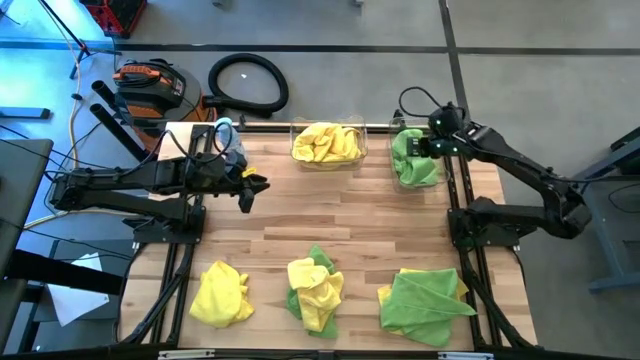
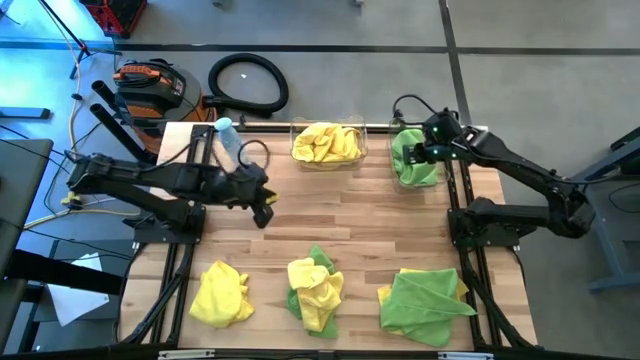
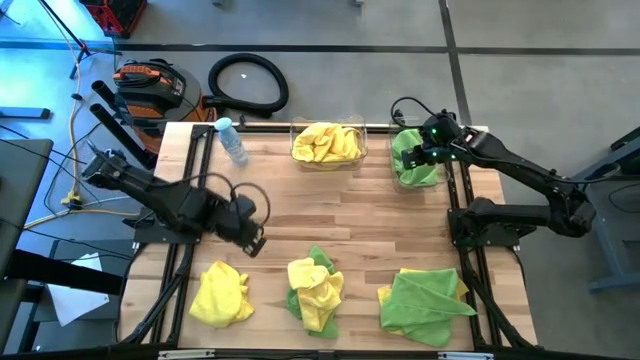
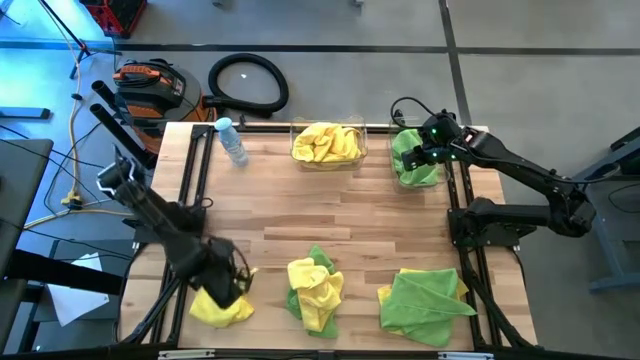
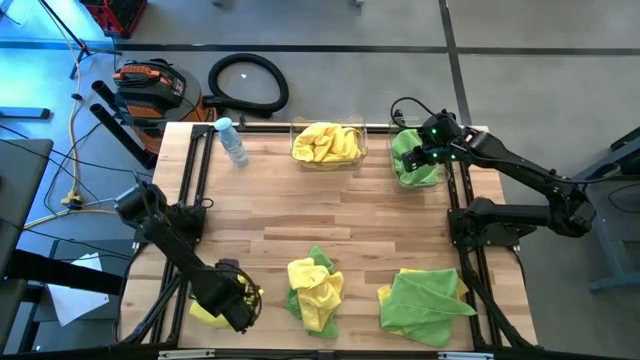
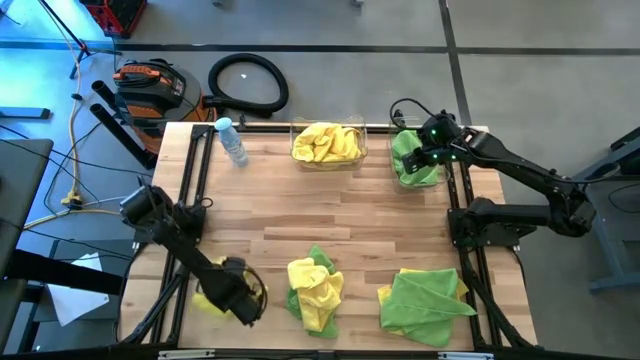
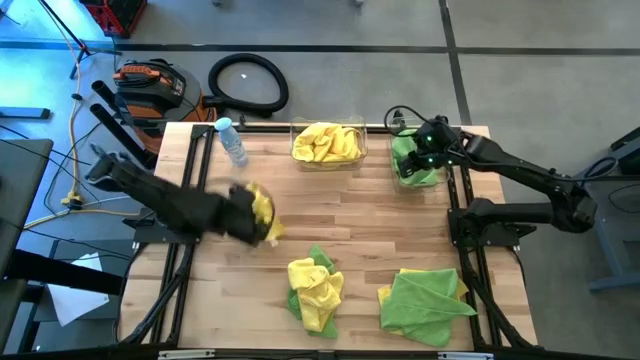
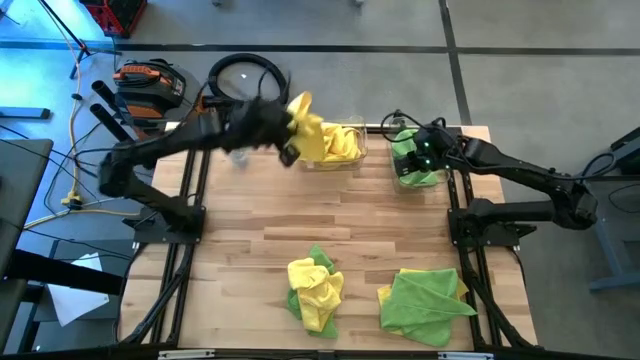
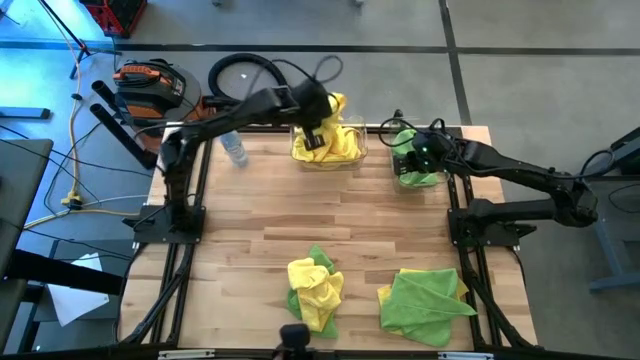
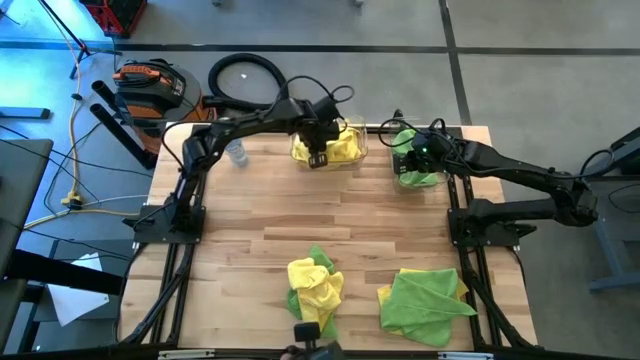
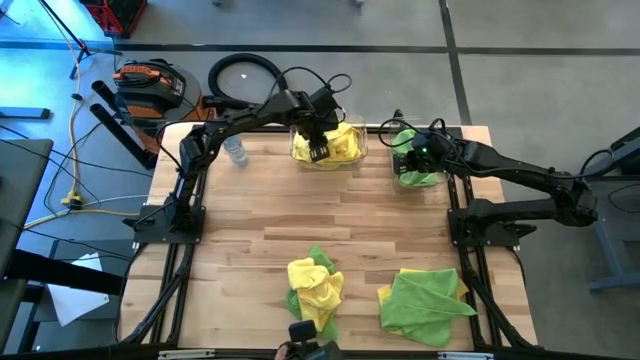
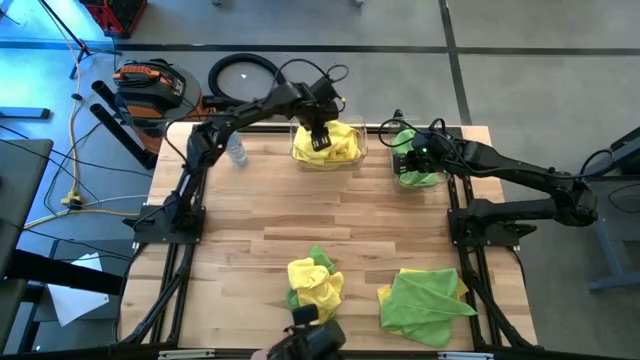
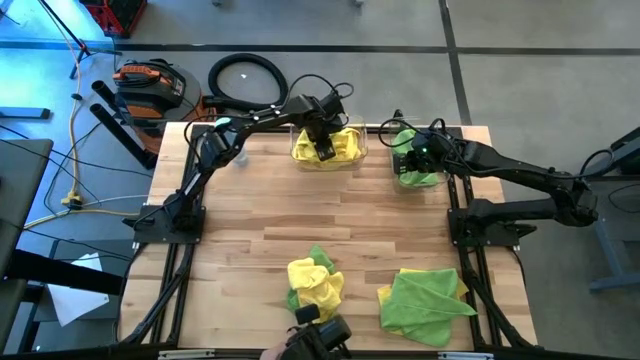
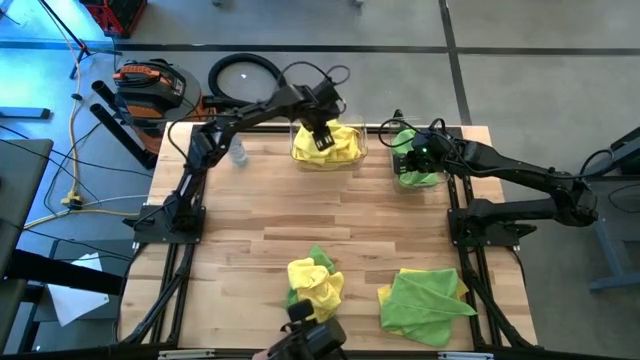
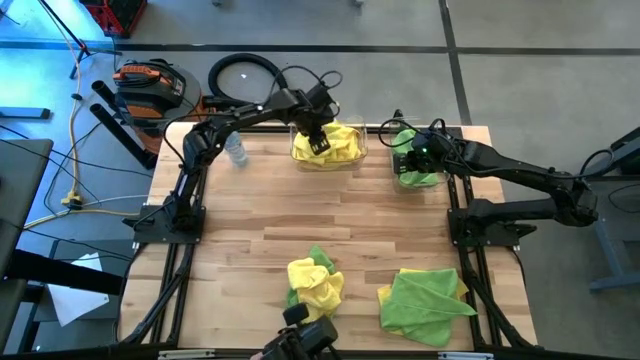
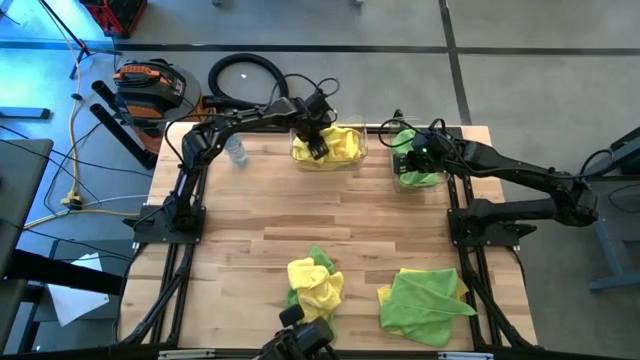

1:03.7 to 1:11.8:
Task: Sort microfiber towel by color & place in baskets
Put the left yellow microfiber cloth into the left transparent bin

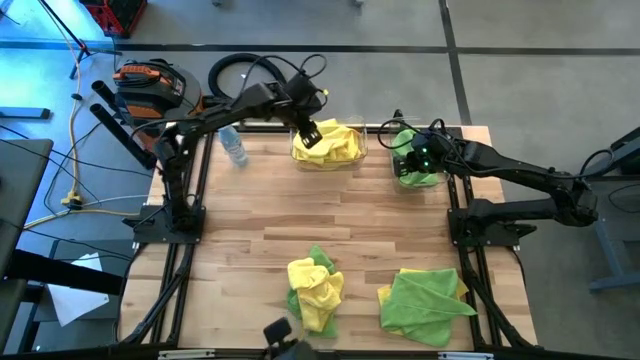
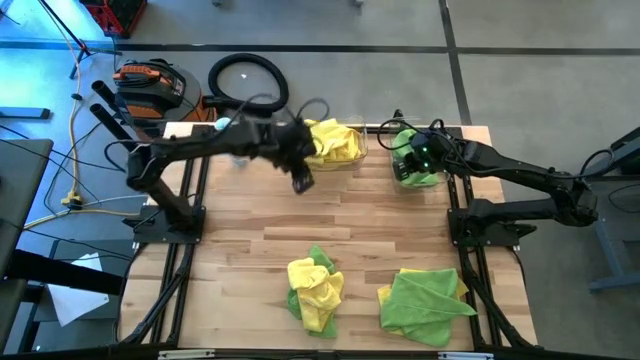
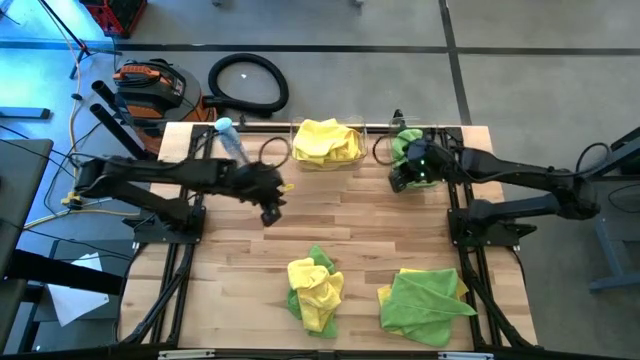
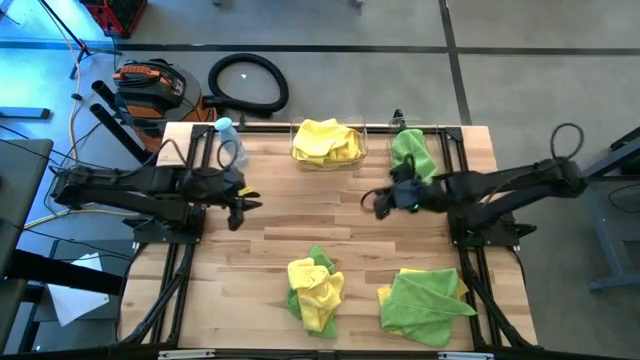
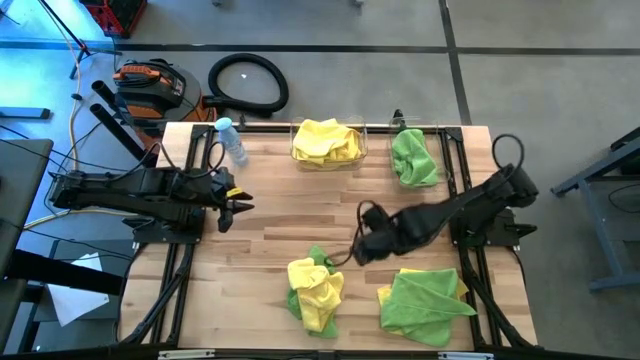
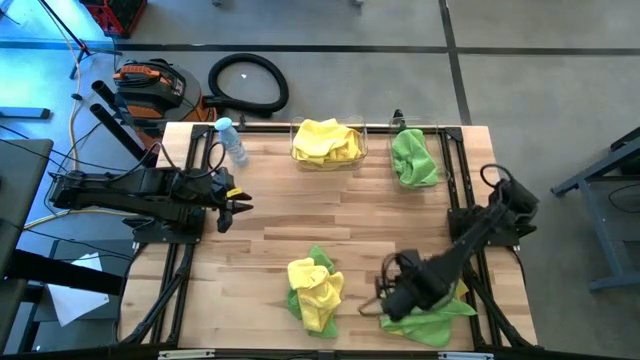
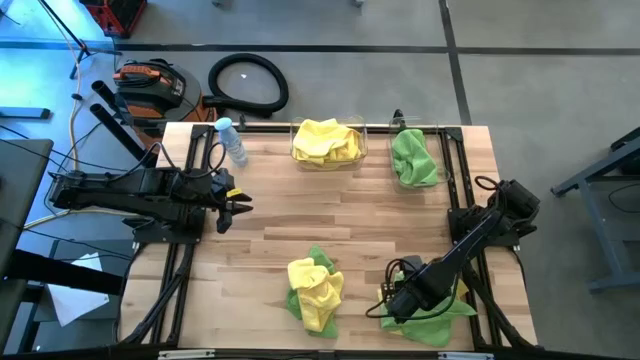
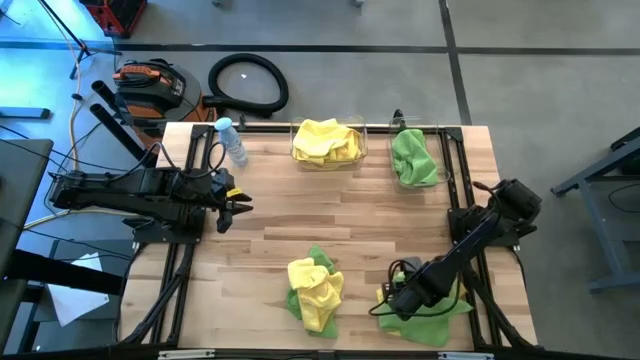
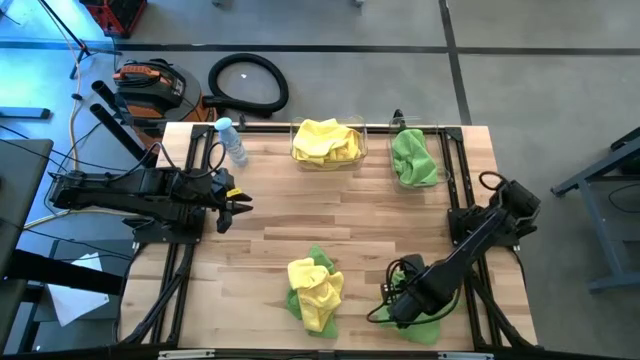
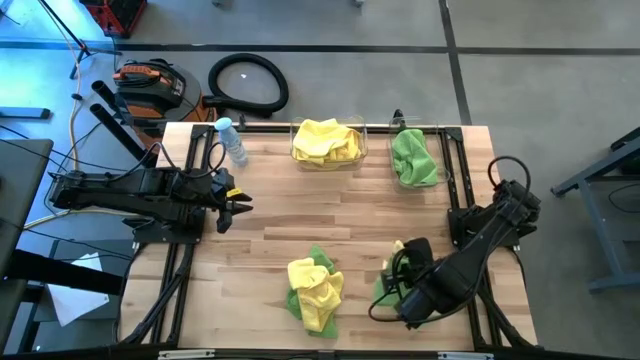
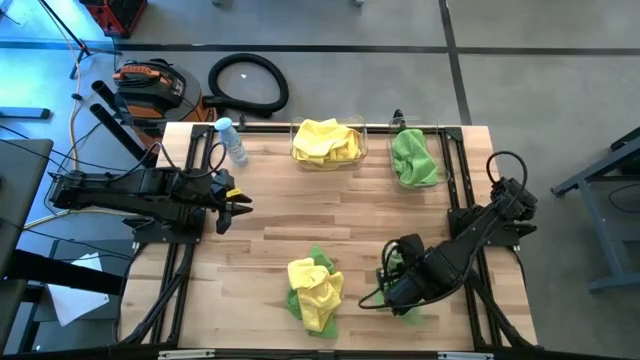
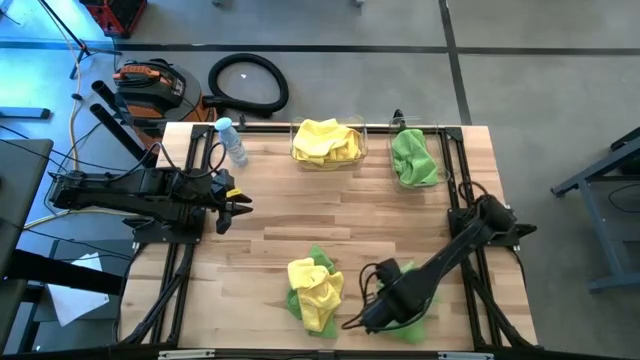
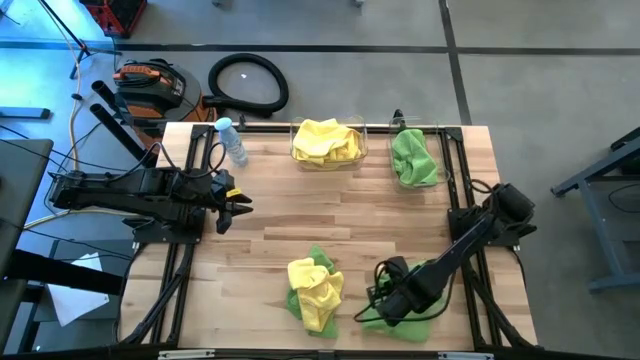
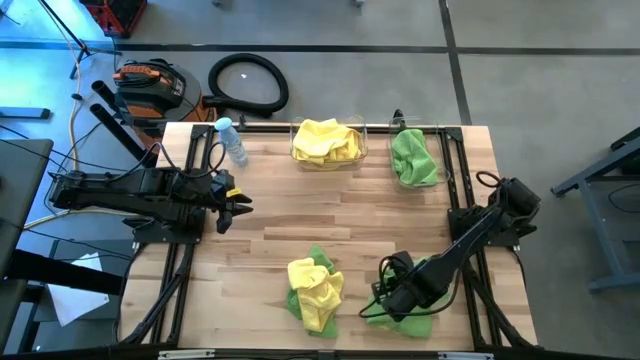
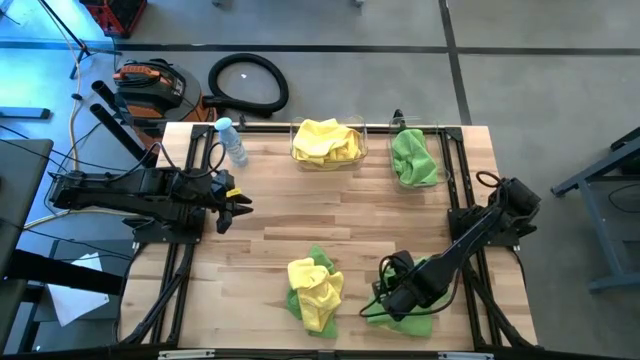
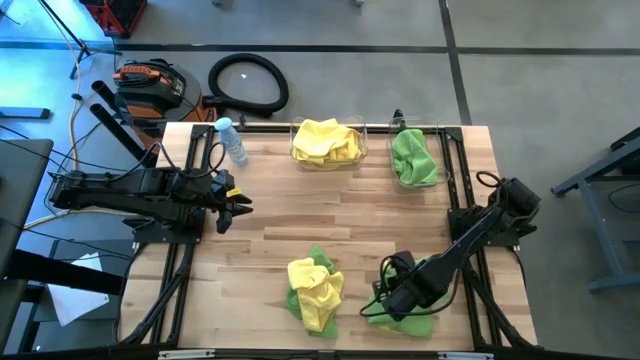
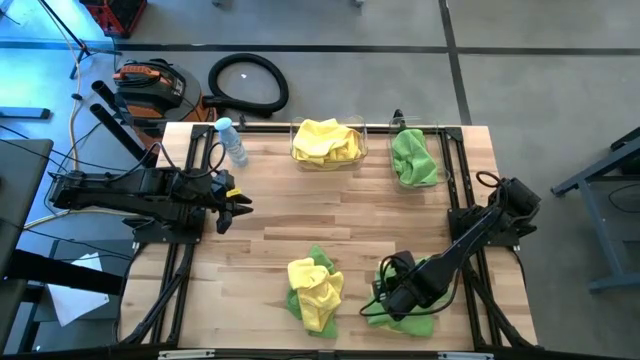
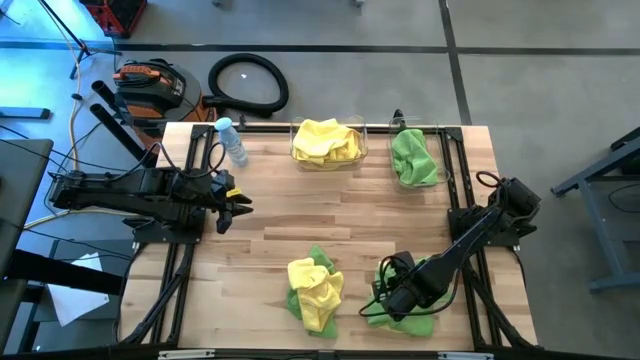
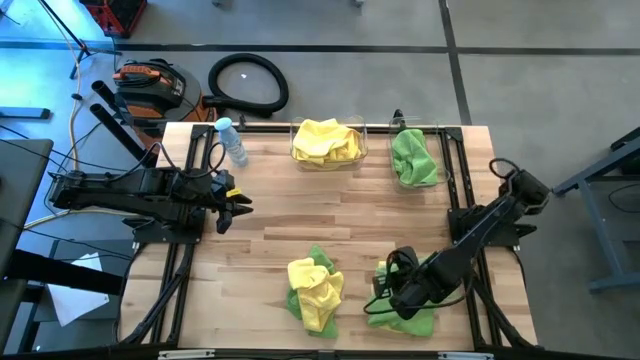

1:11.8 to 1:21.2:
Put the right green microfiber cloth into the right transparent bin

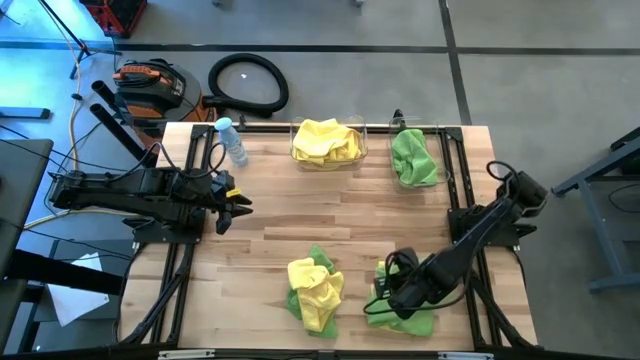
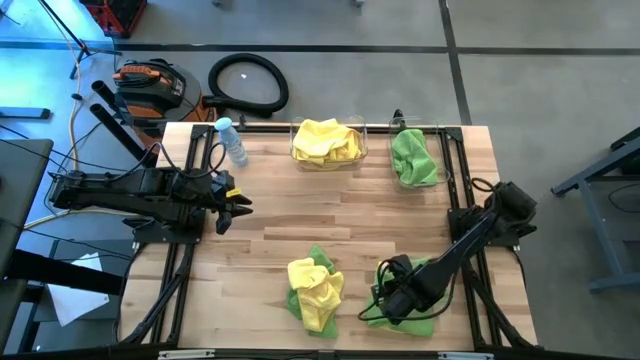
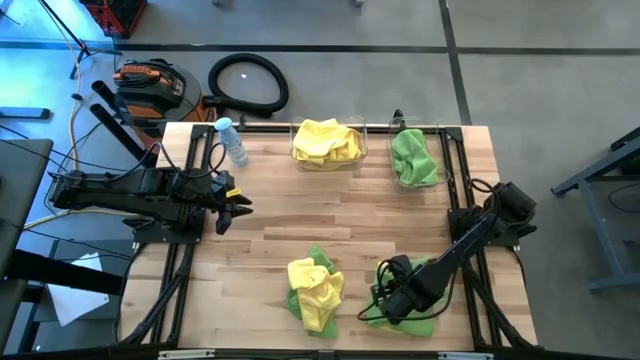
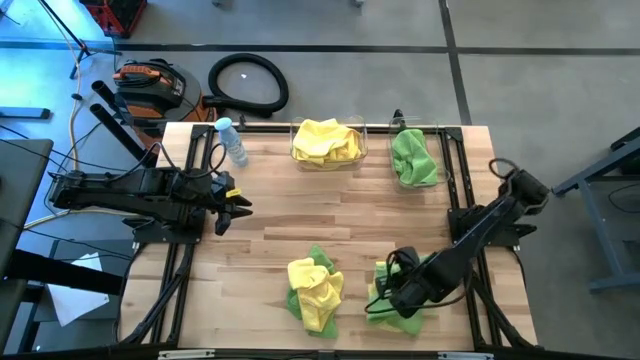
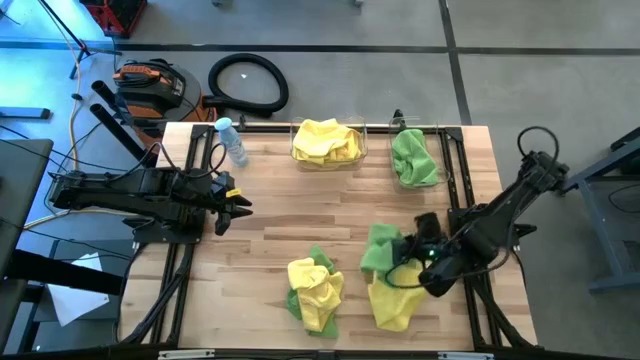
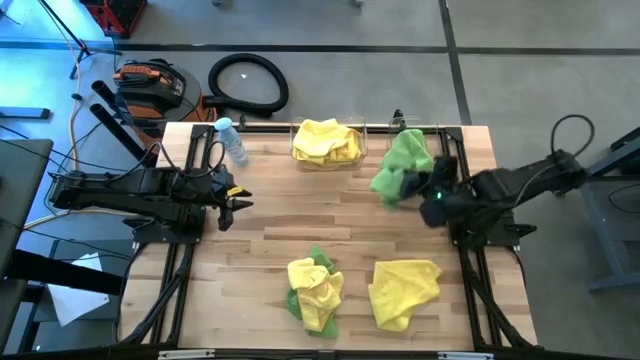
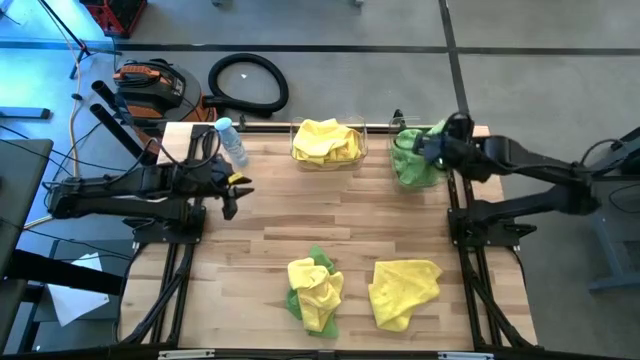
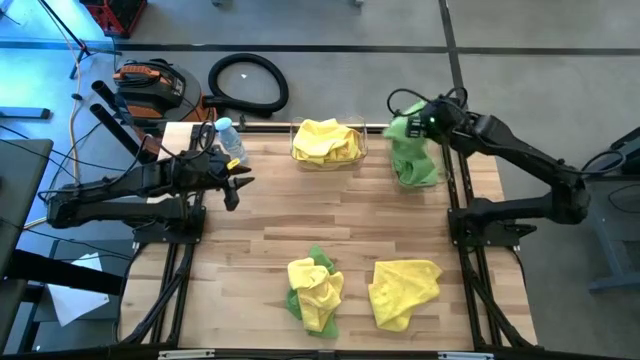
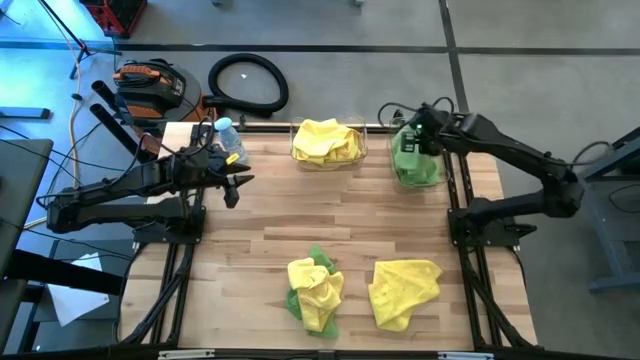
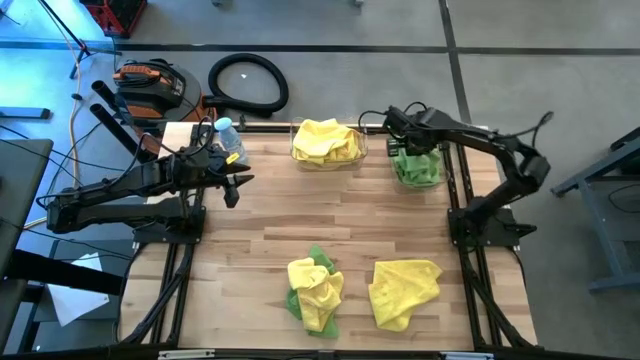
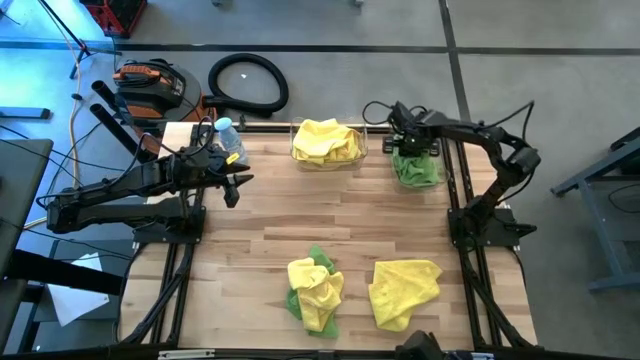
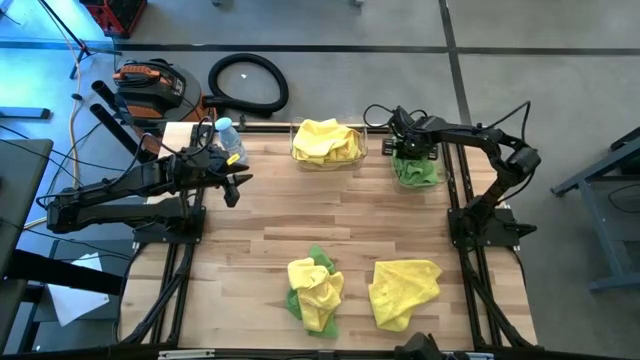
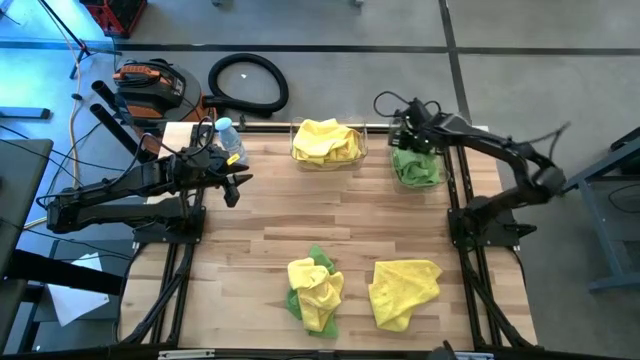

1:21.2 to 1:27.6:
Put the right green microfiber cloth into the right transparent bin
